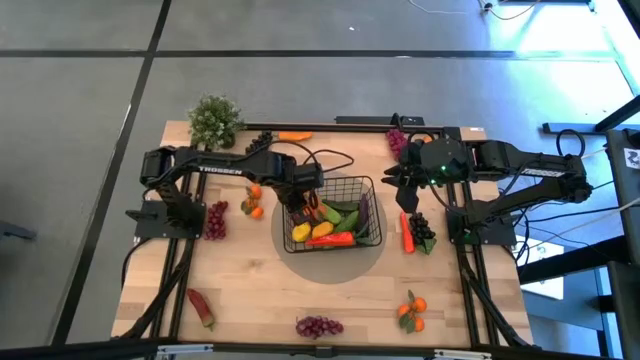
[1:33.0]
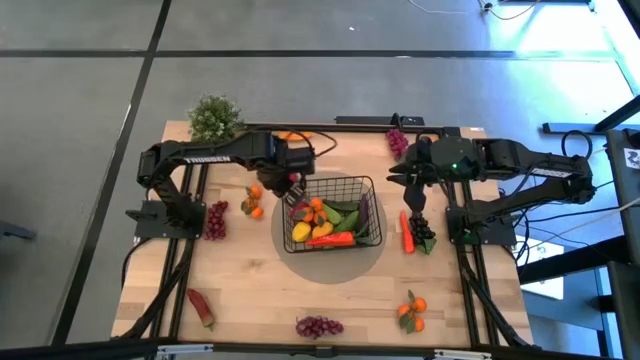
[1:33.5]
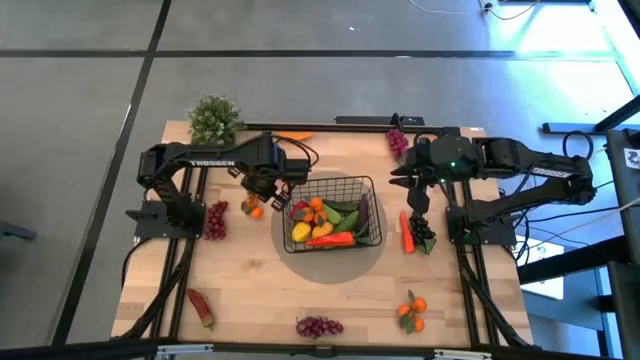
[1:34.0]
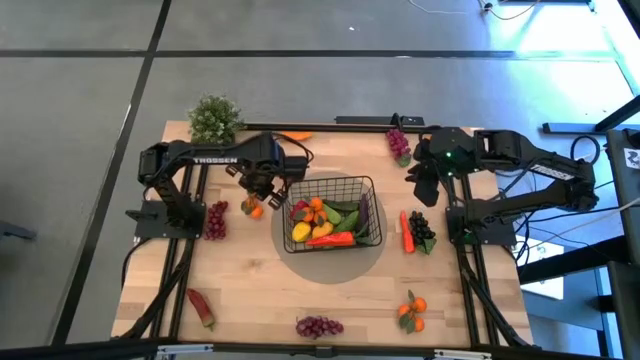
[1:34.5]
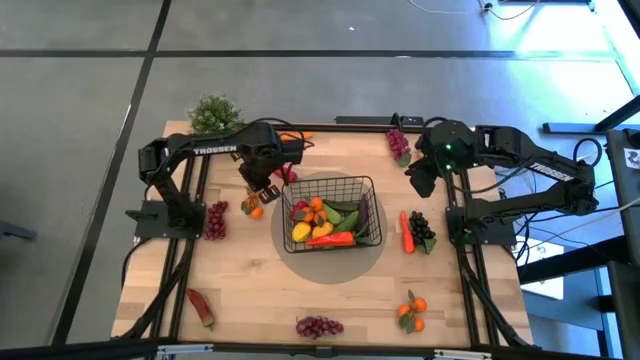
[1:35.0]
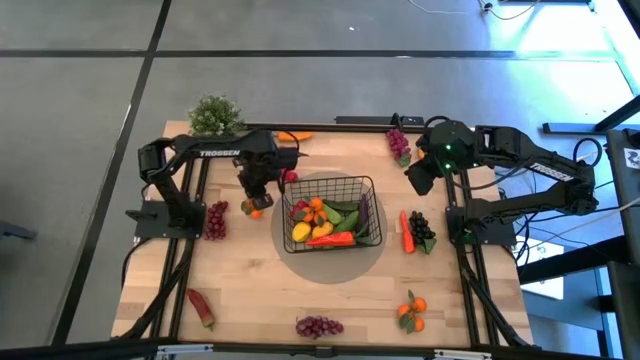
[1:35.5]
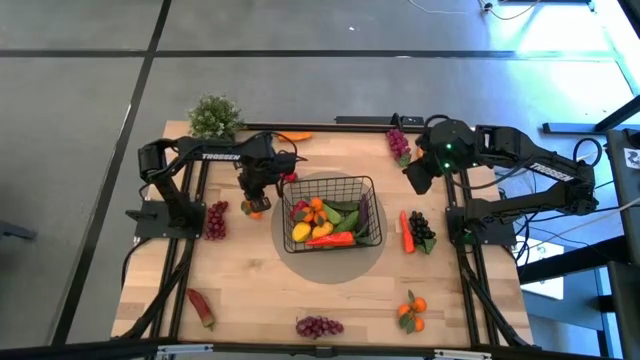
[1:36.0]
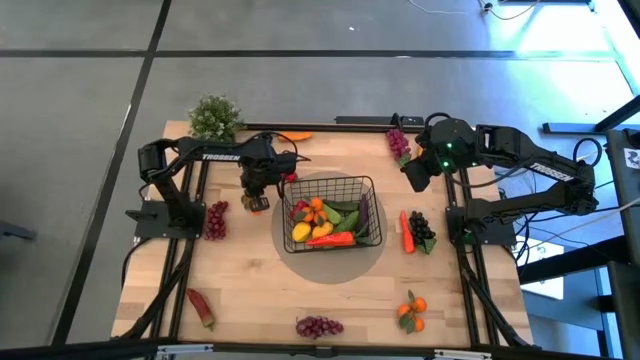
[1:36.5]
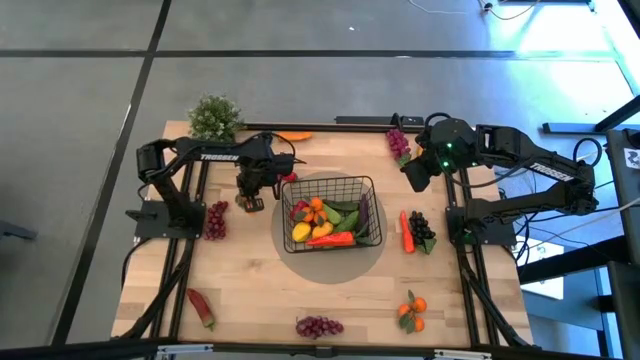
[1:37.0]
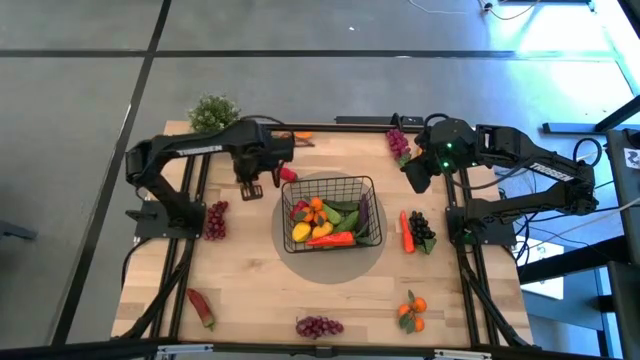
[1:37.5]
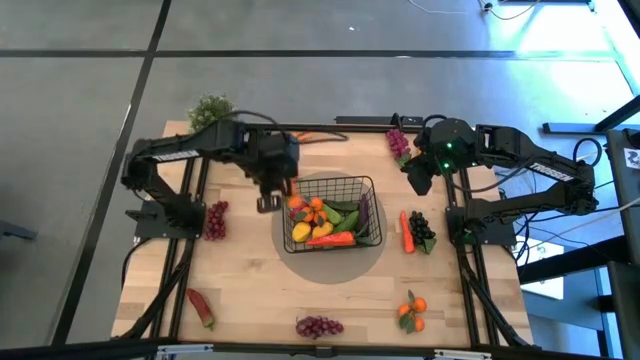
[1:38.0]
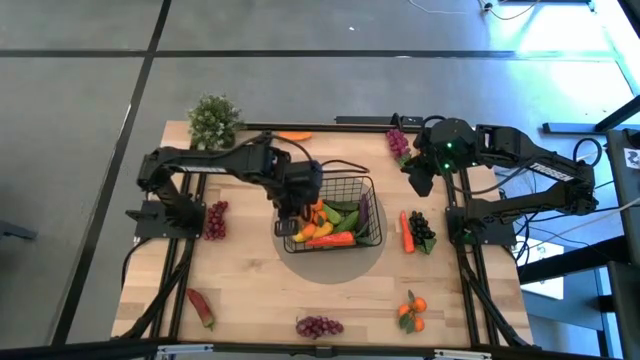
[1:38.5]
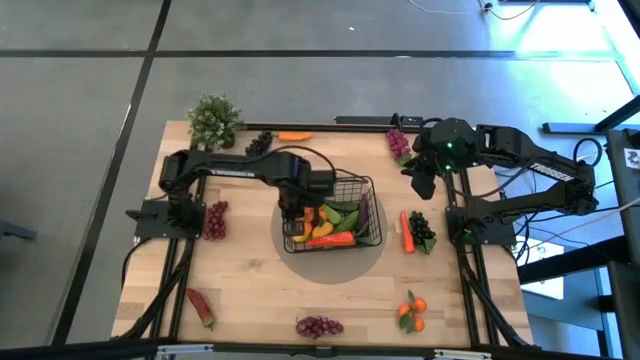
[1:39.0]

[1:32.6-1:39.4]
Task: Build produce basket
Put the top orange into the basket

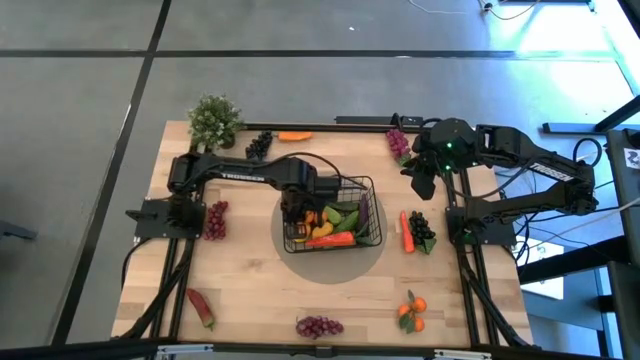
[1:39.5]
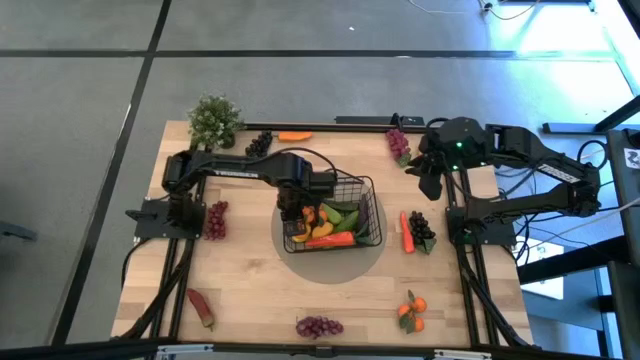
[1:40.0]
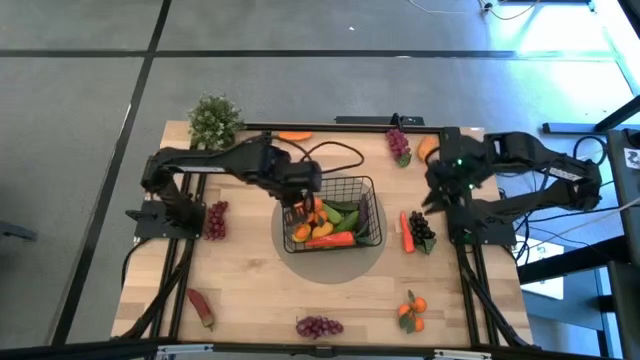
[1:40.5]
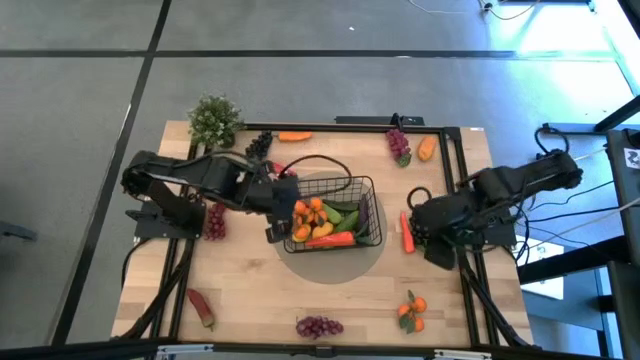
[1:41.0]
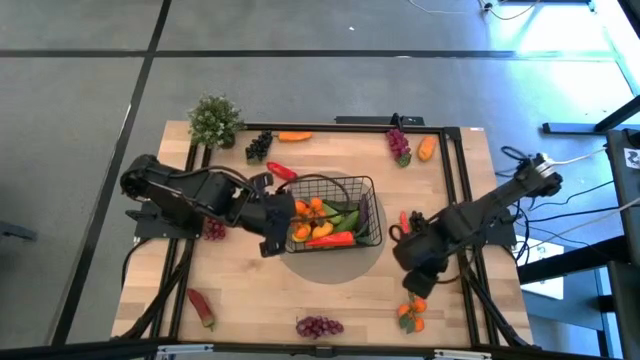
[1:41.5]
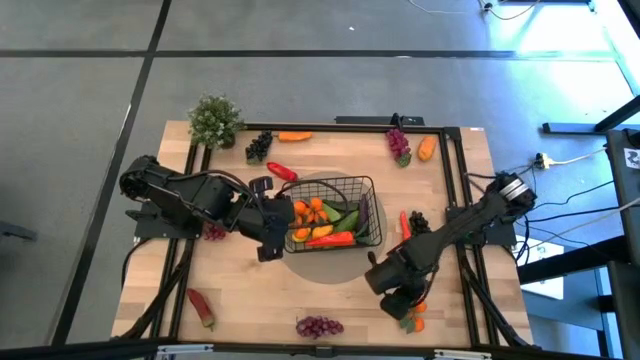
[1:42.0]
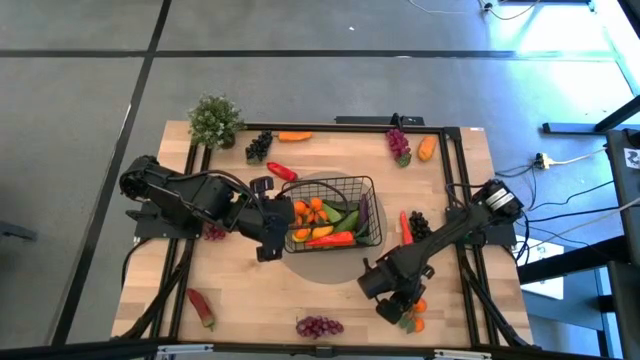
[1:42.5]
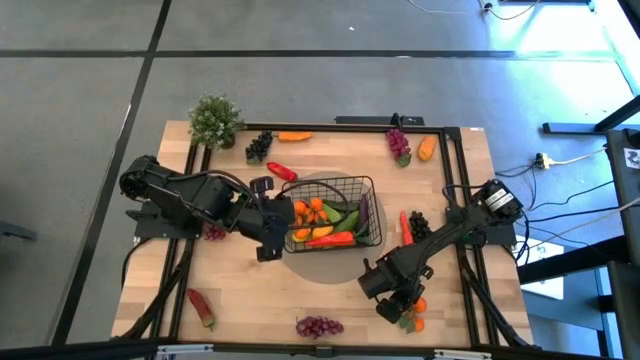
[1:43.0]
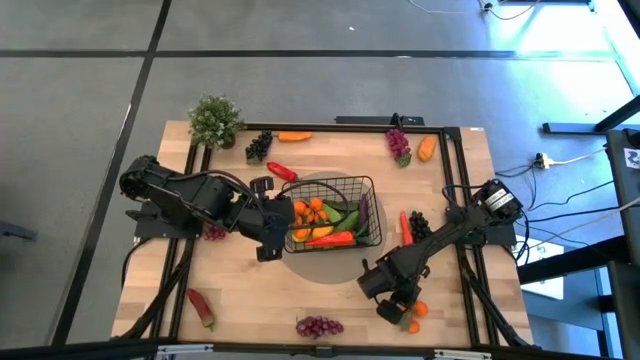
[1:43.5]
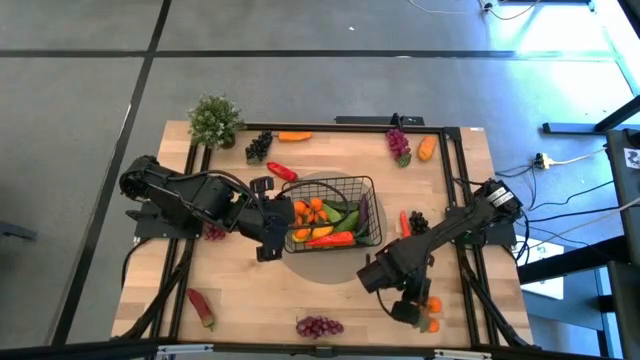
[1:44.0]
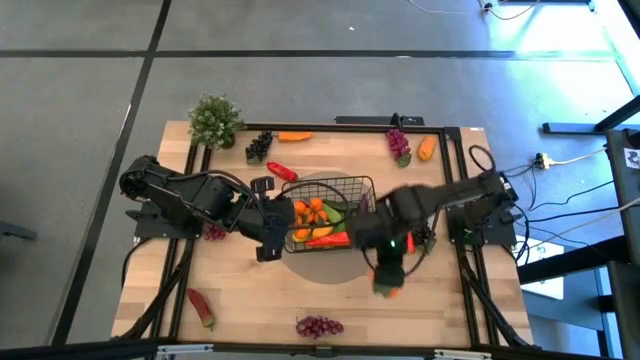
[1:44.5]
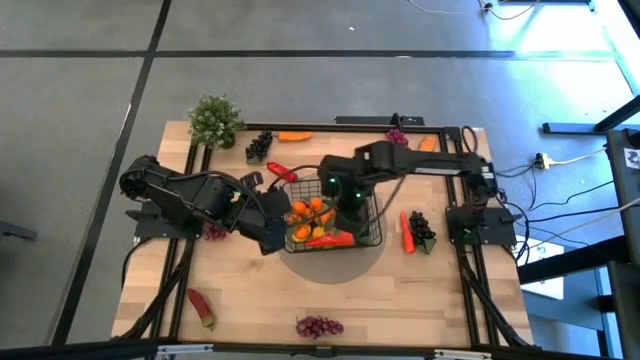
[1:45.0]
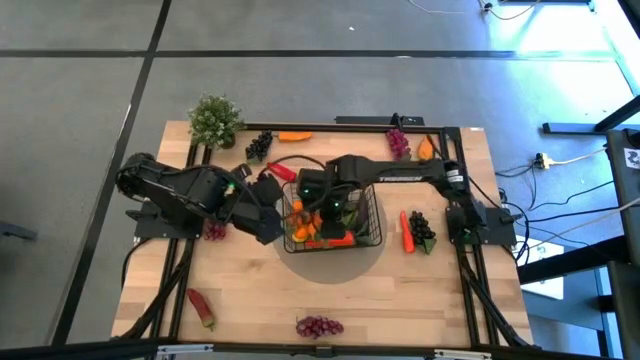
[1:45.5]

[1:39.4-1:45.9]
Put the orange into the basket

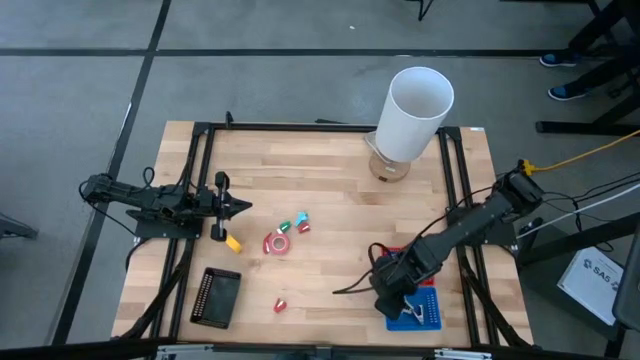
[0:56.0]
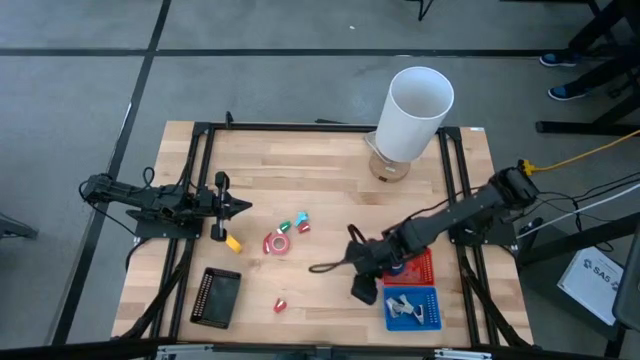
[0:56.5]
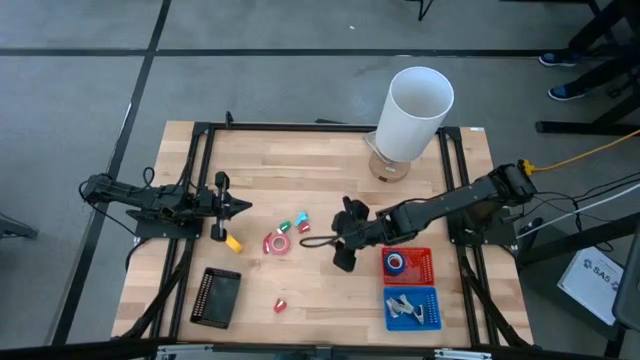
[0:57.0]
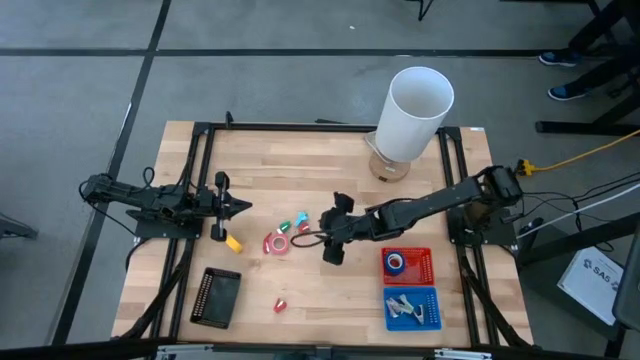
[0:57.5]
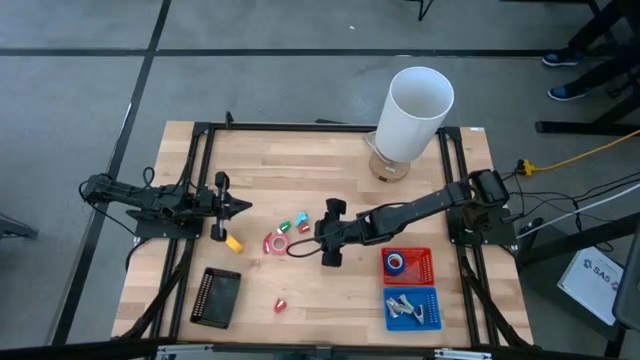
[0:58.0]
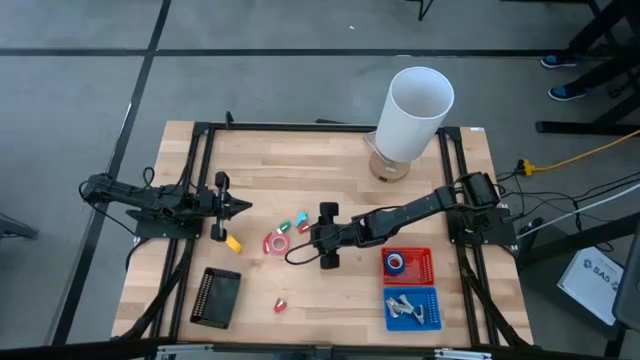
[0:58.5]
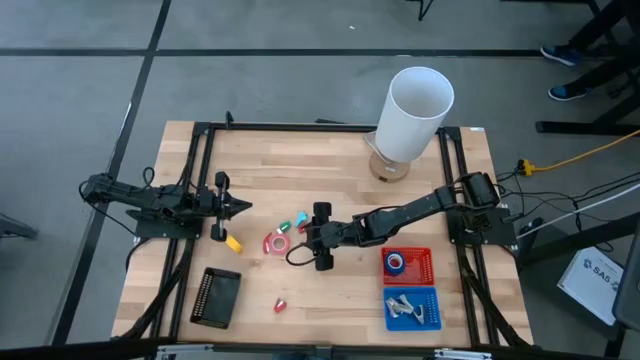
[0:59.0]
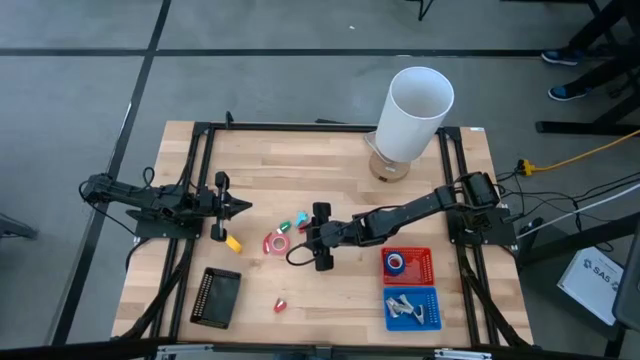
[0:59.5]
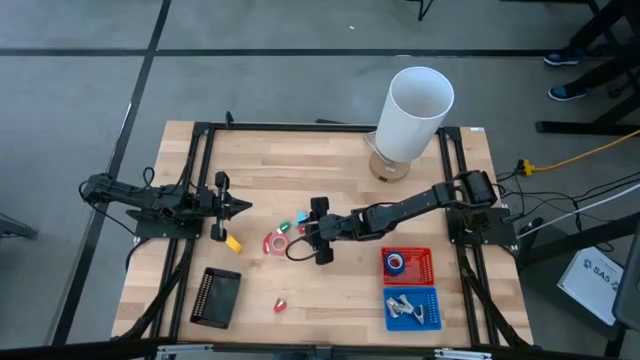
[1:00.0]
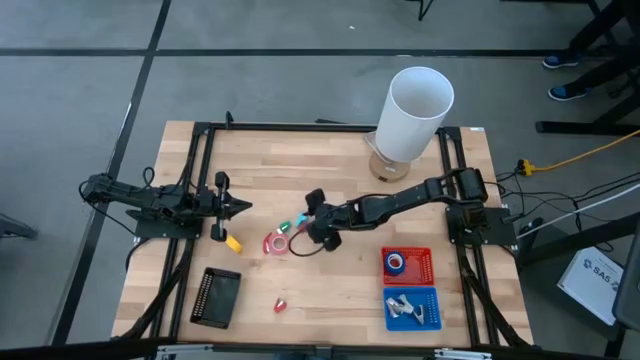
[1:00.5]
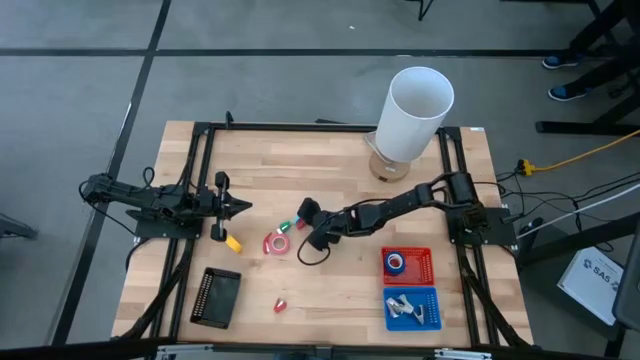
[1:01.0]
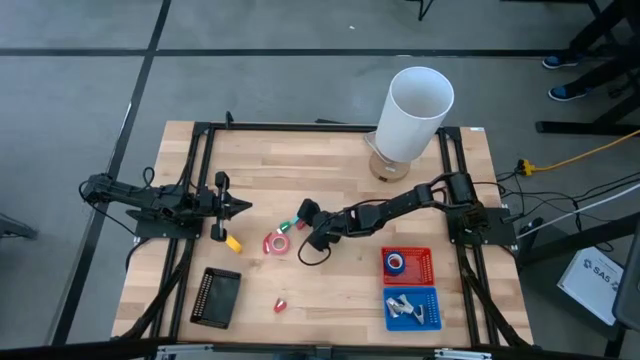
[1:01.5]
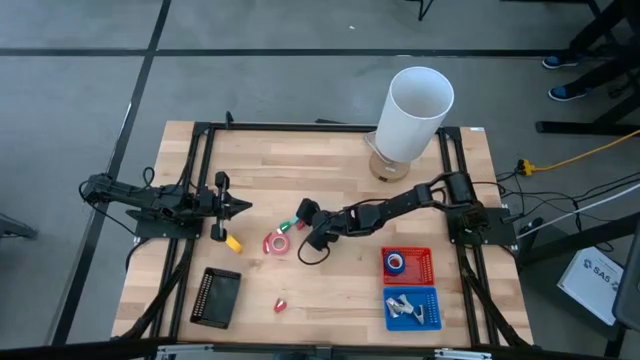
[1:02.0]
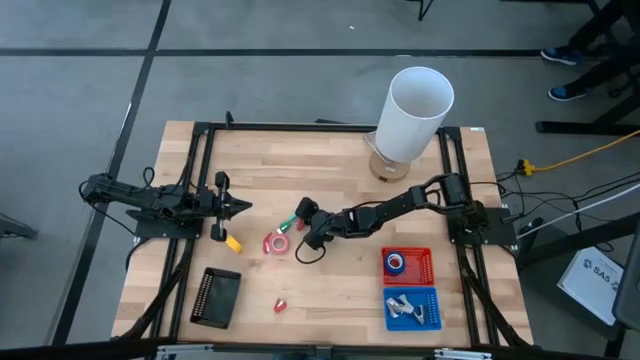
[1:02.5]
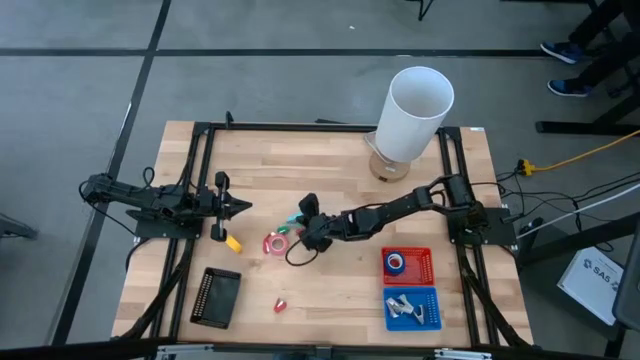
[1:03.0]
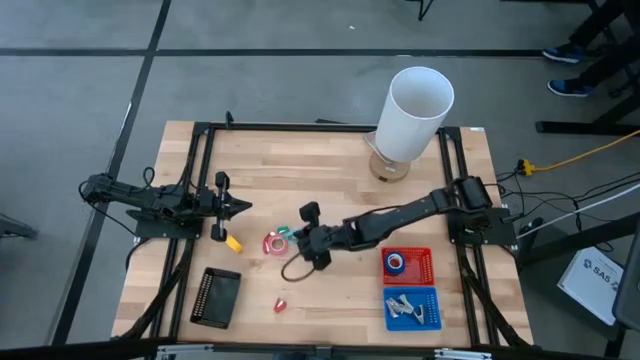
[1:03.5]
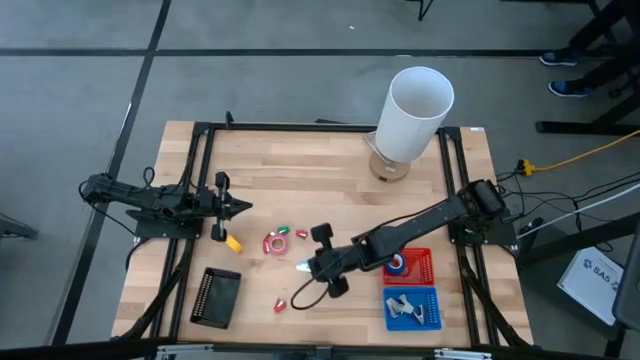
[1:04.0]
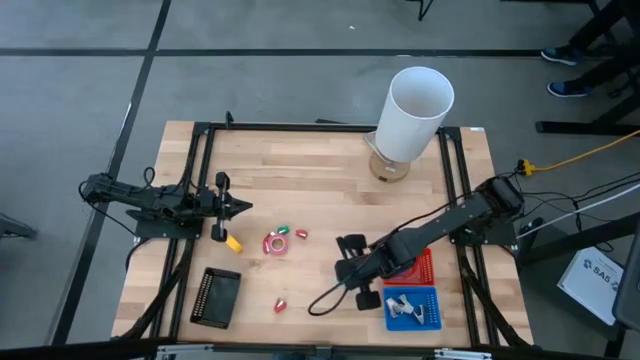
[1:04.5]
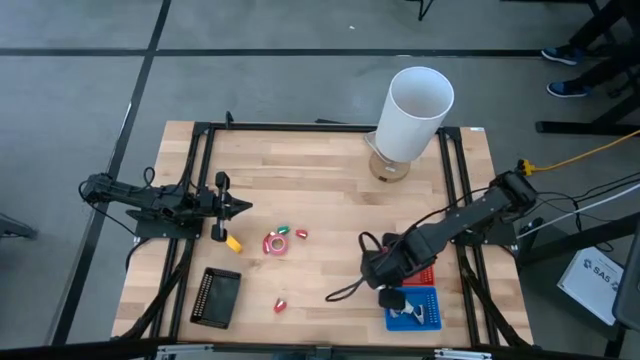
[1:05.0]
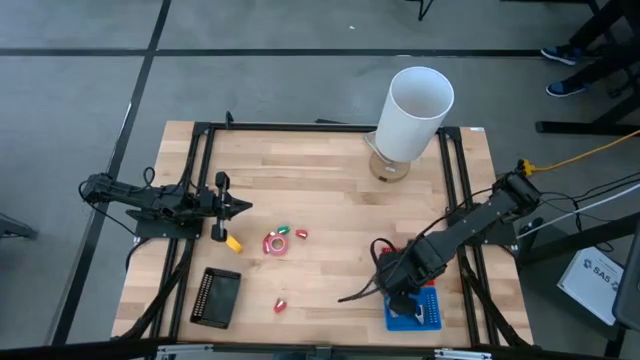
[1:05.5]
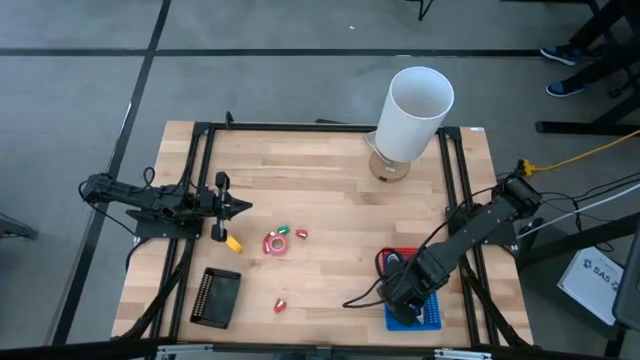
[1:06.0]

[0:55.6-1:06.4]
Task: Pick and place Stapler, Stapler remover, tape
Put the light blue staple remover into the blue basket
